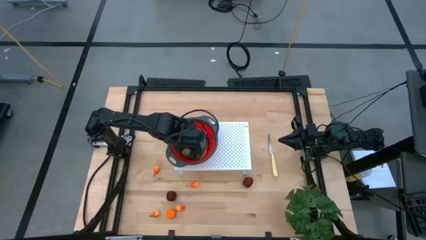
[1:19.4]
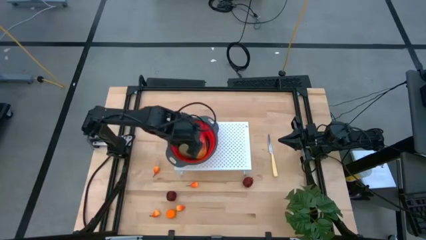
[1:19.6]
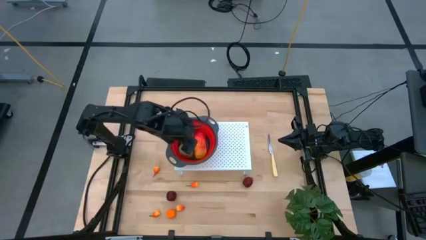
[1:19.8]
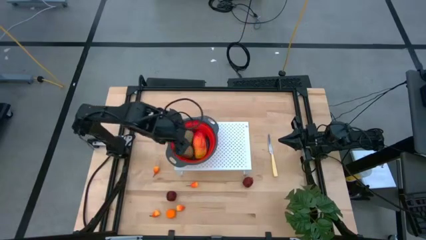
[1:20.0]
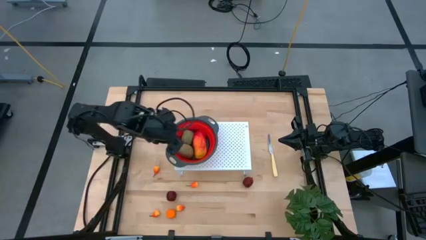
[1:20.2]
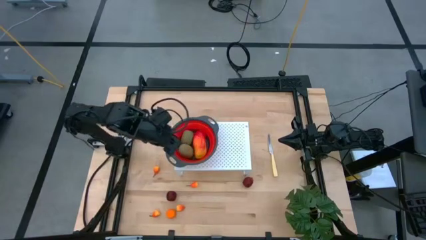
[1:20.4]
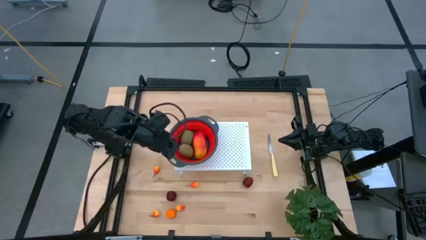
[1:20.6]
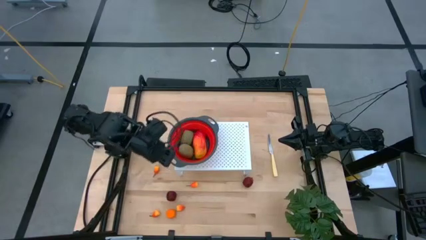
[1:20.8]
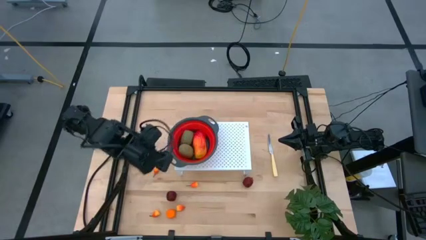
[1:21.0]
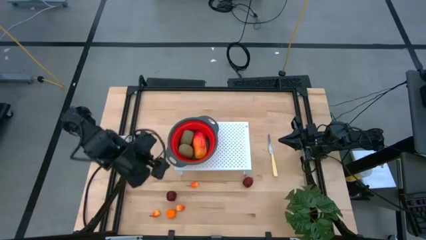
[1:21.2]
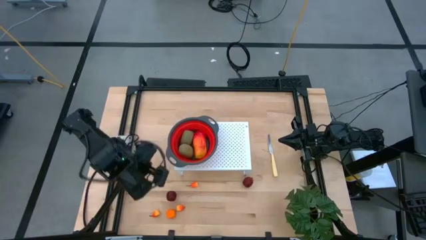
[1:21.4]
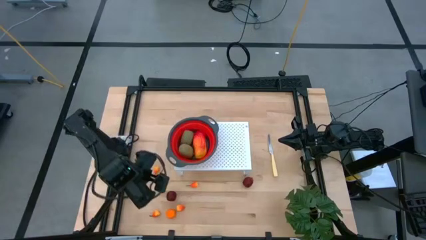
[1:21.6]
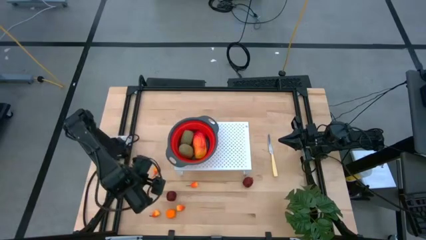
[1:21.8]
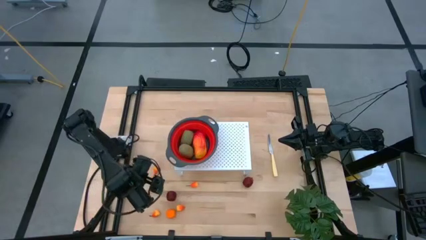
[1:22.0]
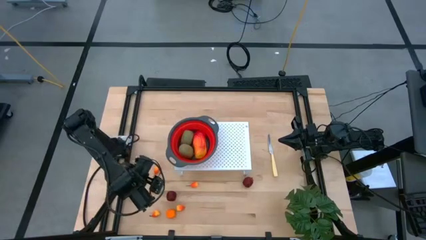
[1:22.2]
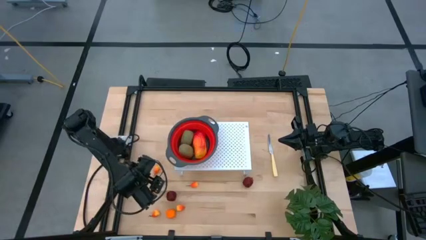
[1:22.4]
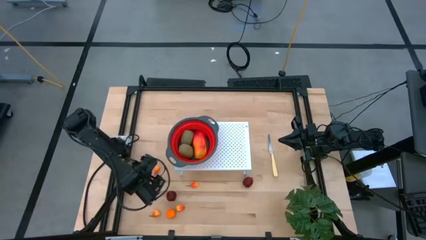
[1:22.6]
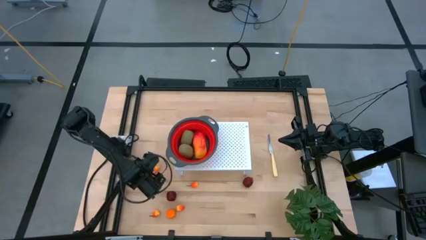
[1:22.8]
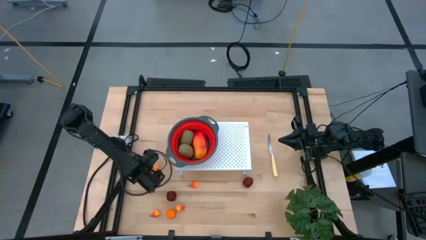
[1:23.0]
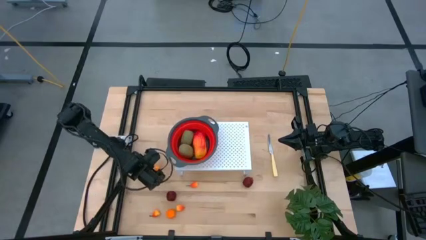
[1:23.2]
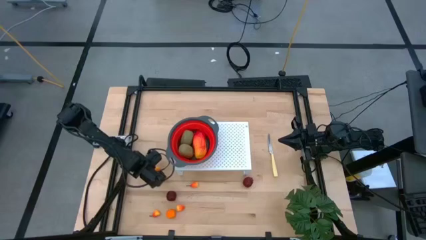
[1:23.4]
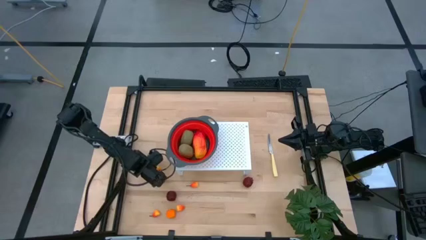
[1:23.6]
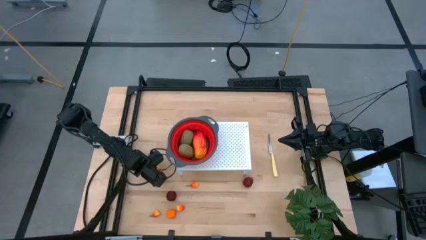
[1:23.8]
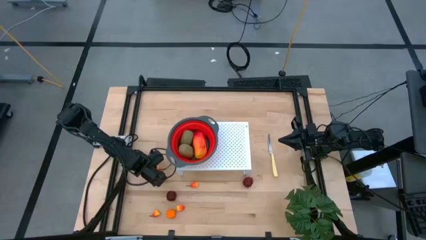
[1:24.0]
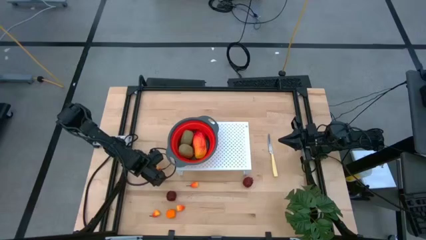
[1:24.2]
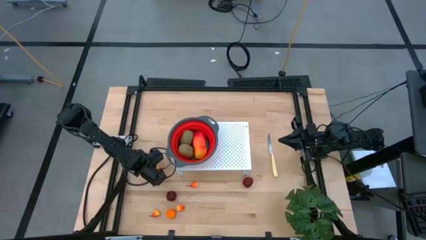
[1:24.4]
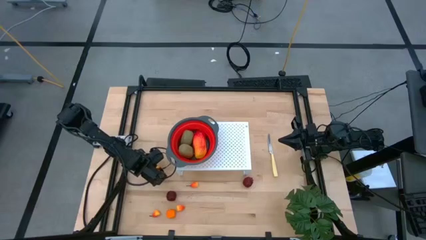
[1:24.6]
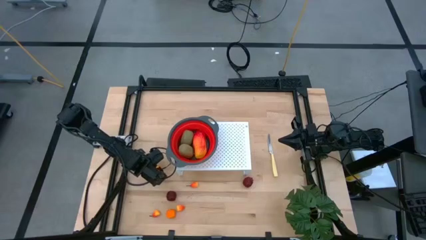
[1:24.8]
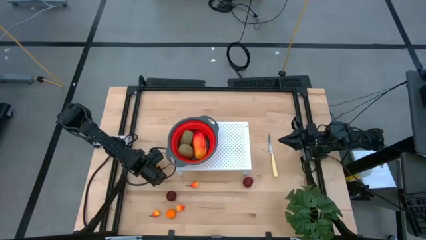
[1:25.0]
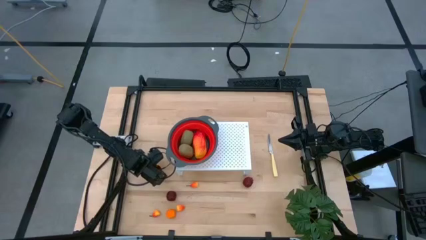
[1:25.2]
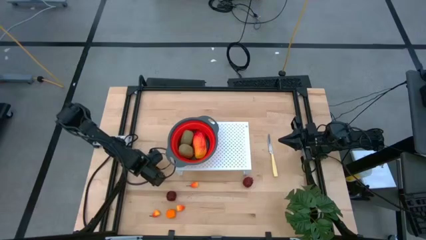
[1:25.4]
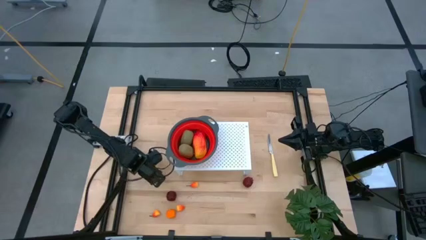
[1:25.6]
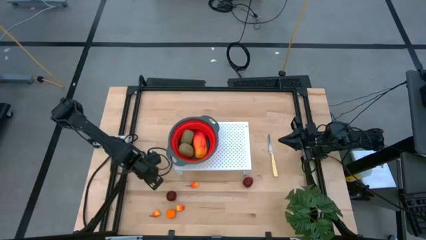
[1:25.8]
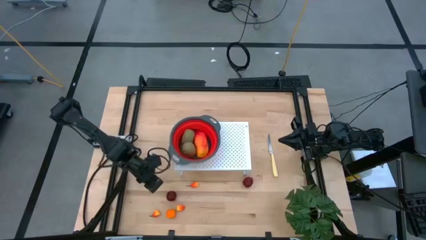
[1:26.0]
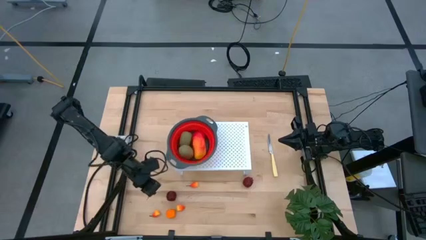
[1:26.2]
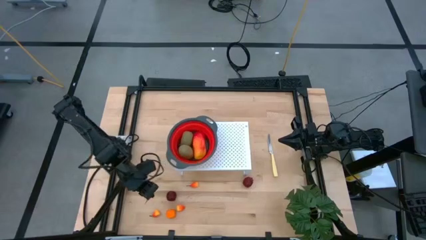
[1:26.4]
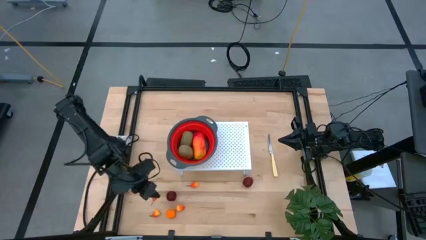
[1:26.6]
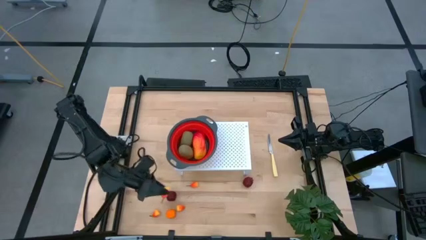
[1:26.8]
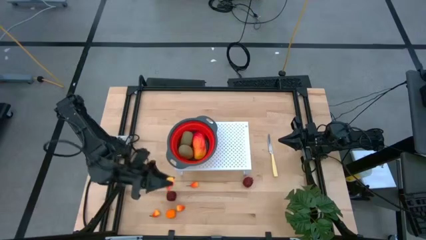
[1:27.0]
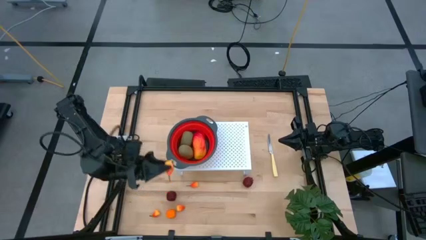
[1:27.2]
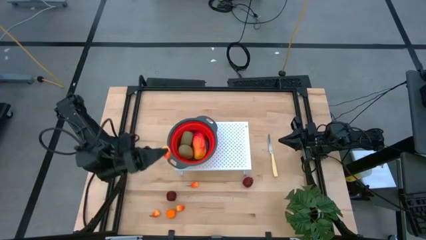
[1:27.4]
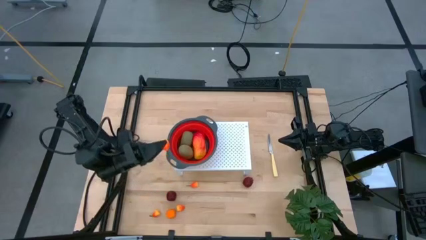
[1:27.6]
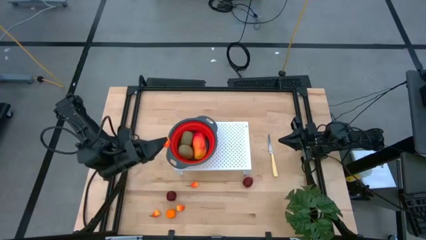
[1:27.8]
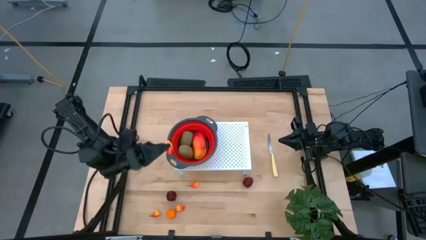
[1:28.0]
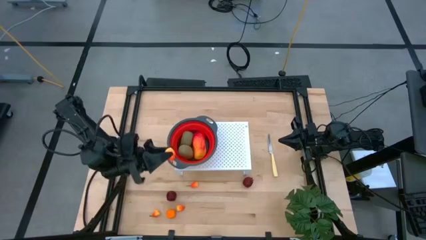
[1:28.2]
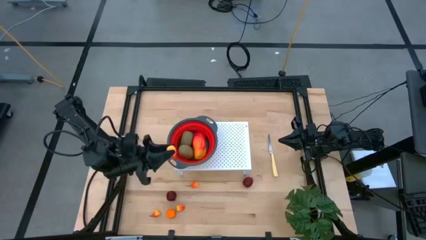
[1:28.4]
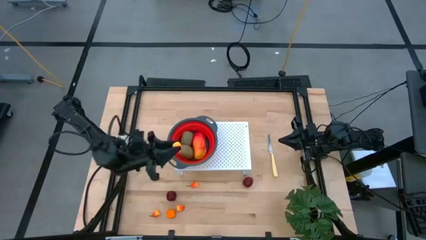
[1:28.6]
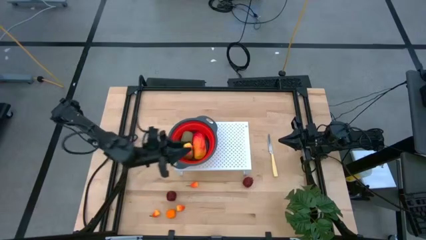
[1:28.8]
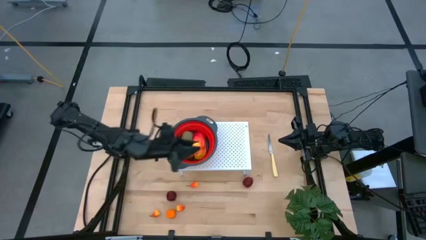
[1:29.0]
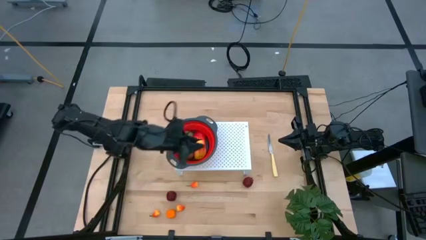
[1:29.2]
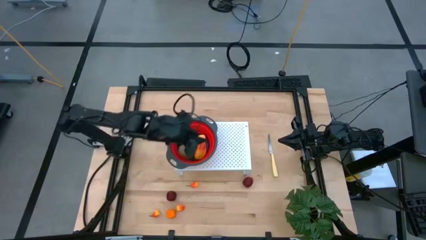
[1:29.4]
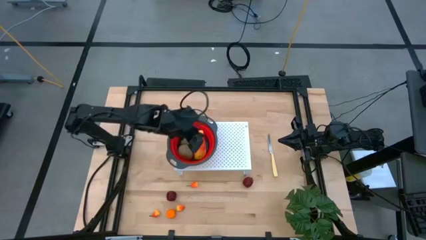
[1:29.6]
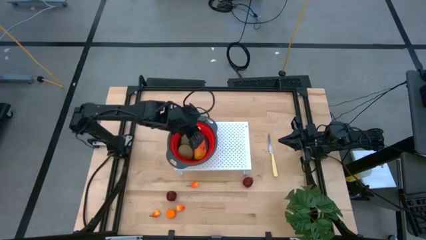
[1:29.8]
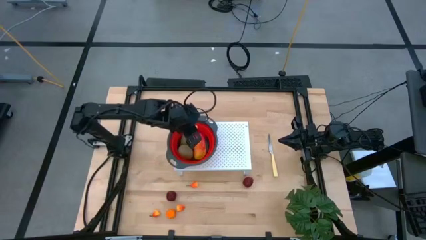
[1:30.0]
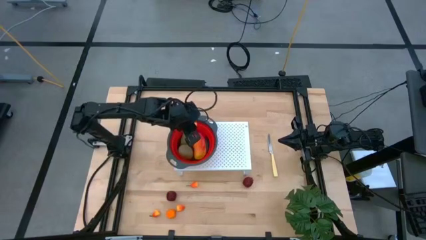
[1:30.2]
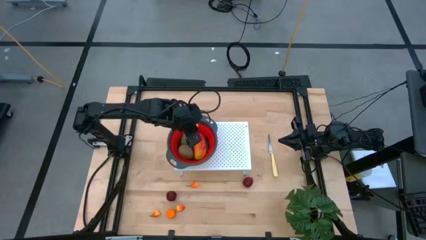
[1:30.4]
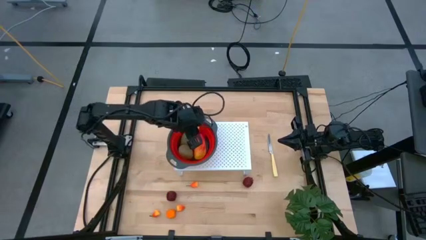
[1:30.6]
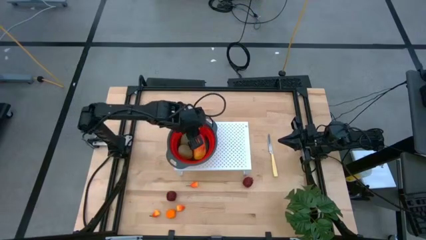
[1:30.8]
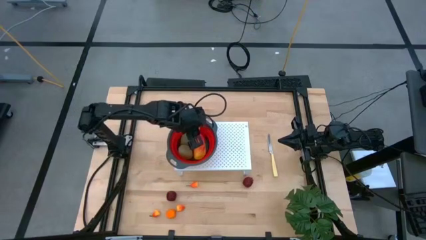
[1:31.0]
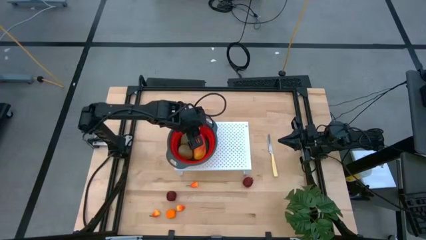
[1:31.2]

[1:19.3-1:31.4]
Task: Pick & Place Fruit
Put the orange pear into the red strainer bowl on the shelf
